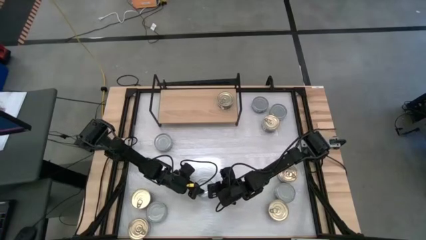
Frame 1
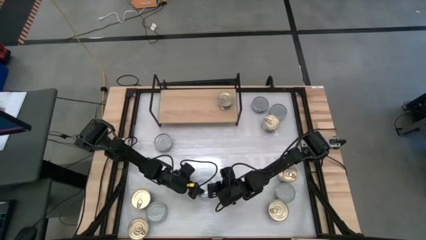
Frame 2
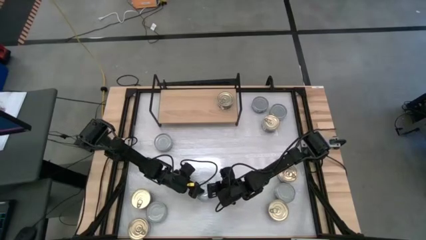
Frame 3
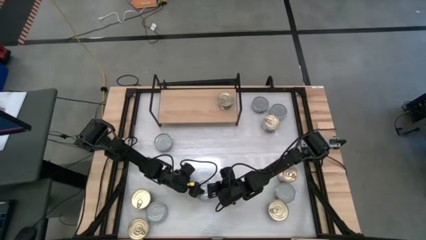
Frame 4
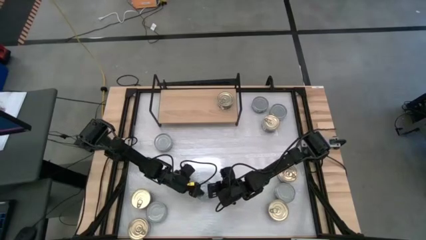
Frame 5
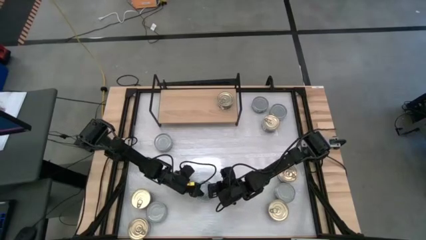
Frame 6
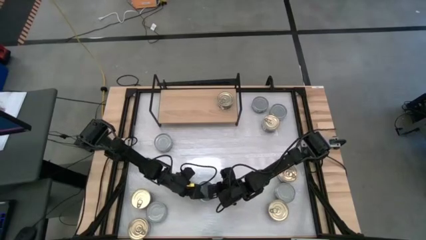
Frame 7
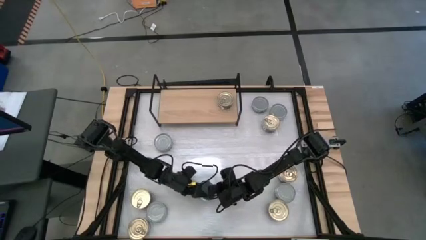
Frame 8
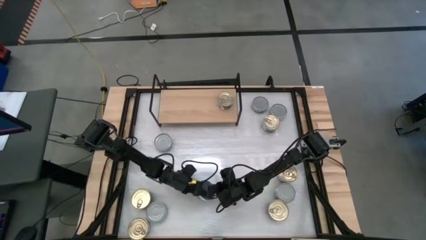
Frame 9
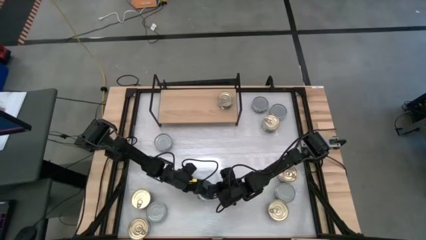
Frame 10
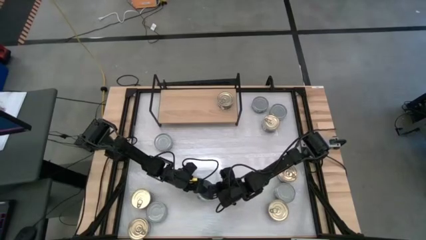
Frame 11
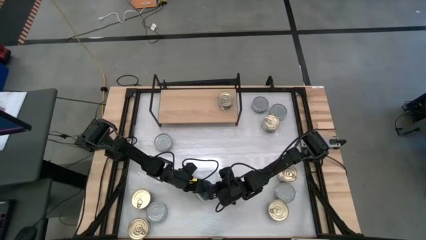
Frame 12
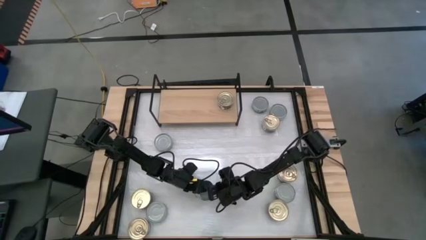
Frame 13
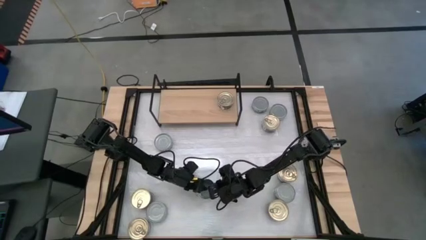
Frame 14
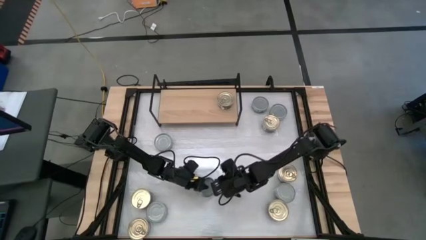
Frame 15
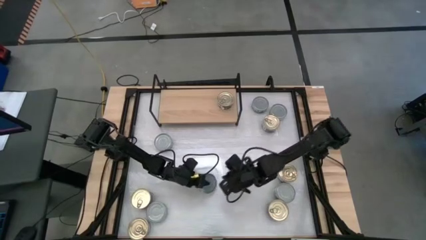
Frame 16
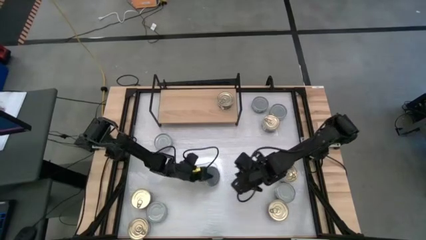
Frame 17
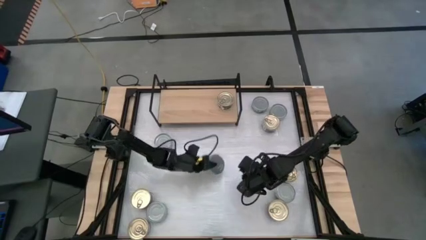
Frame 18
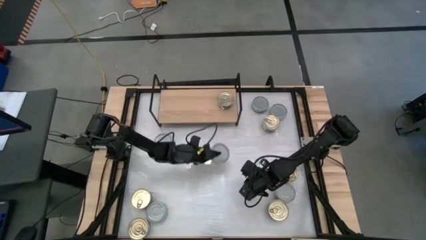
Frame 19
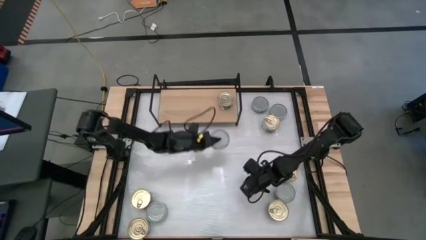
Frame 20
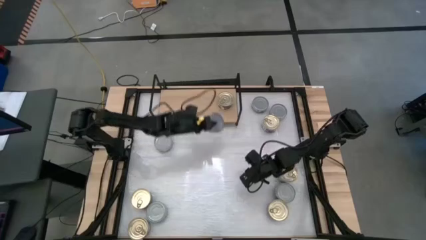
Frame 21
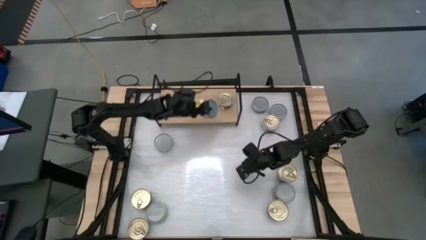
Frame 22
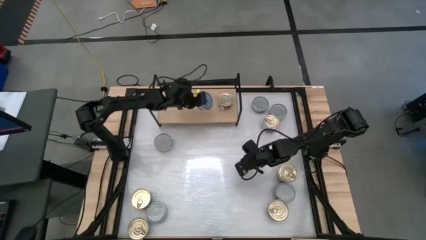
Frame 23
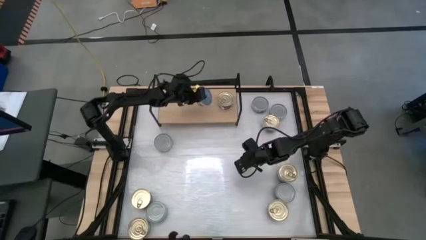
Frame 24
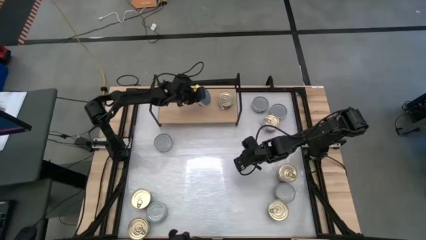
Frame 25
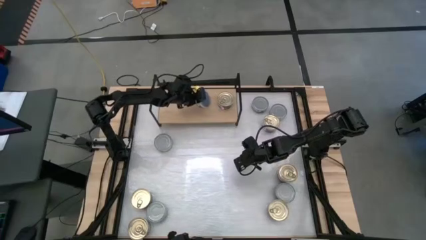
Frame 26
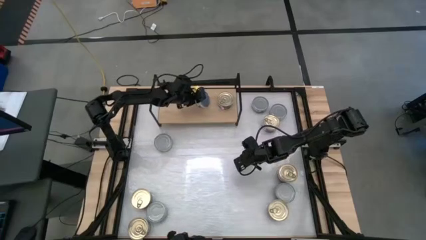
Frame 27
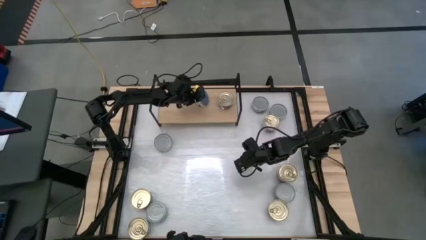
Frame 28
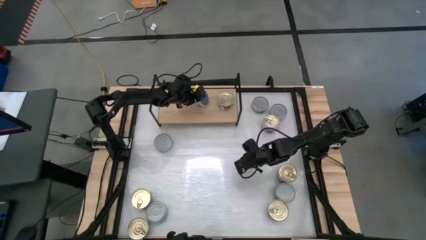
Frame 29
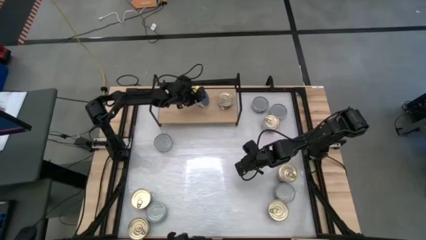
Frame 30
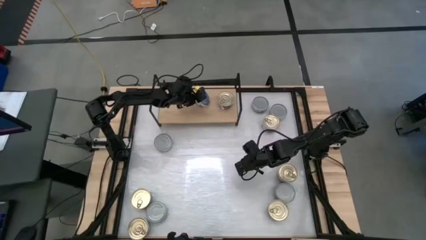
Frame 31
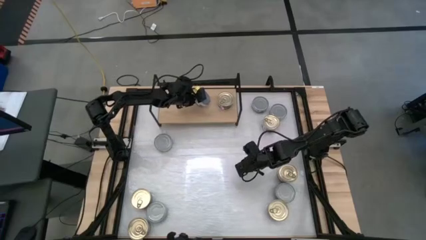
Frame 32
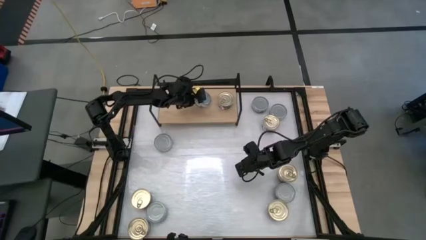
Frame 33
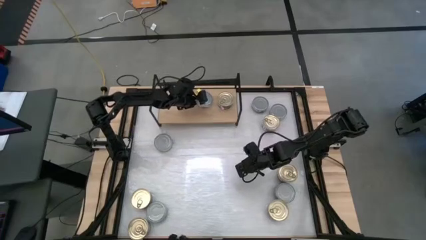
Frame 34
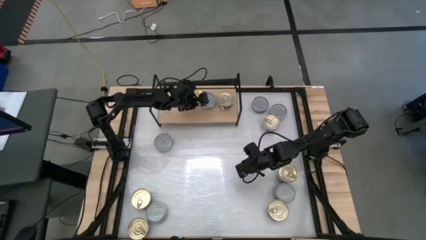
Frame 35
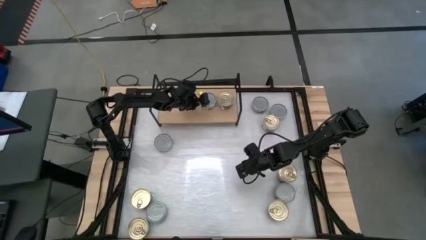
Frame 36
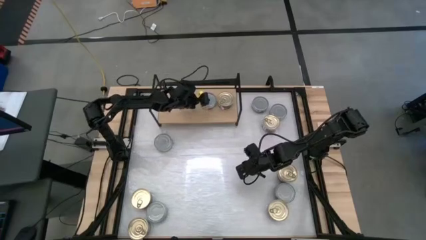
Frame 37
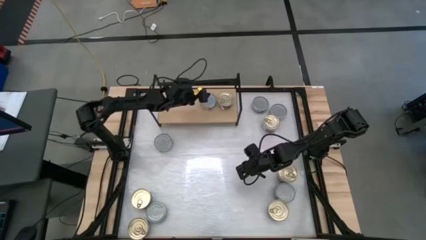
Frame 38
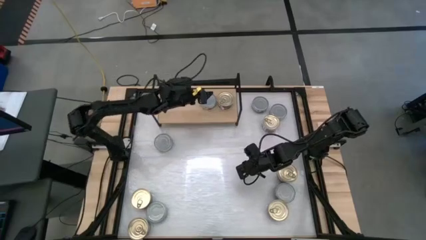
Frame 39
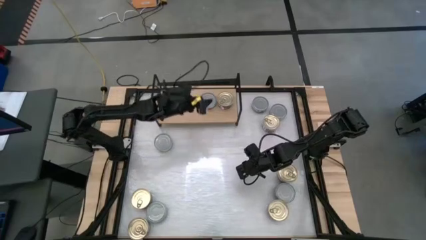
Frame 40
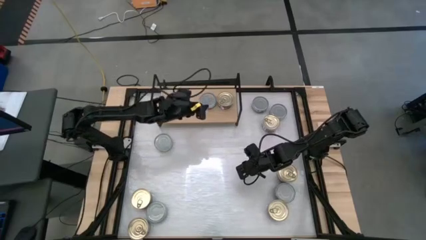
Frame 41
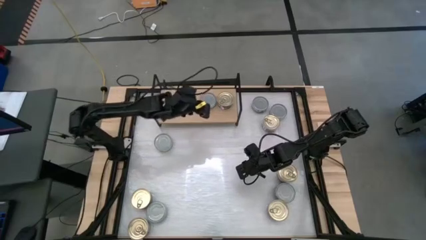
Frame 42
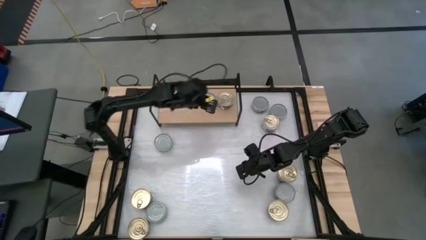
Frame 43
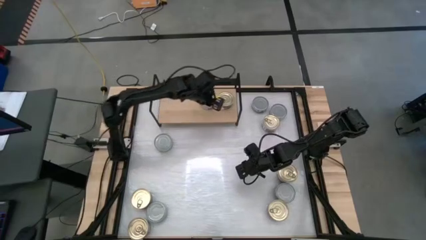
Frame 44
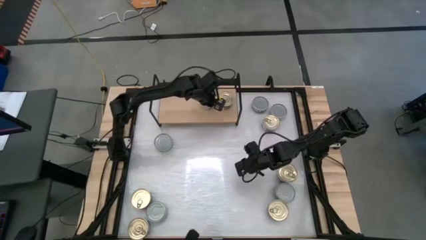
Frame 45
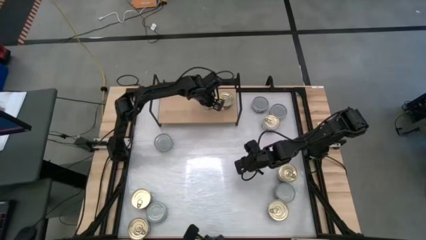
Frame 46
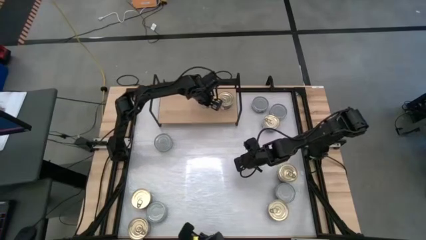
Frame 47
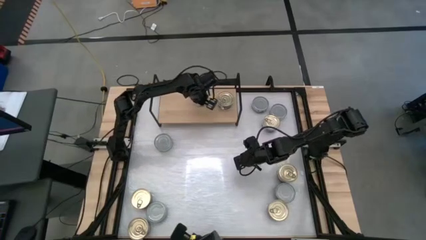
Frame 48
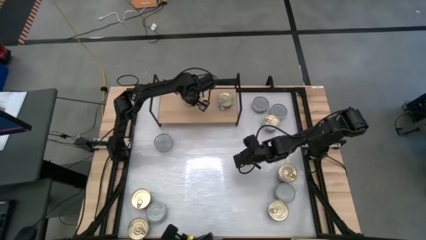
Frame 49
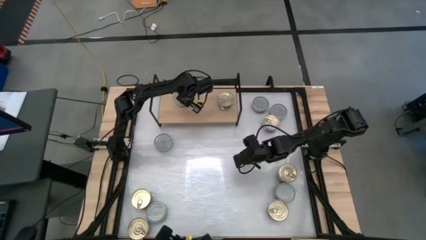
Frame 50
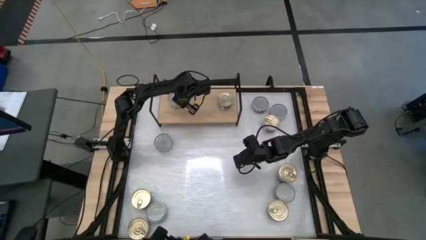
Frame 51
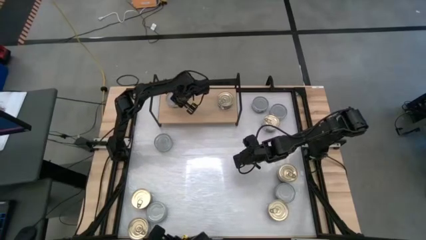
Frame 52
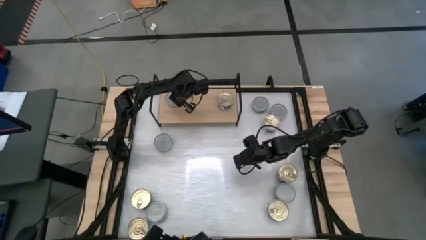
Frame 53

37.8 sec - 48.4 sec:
Task: Stack canned seafood by type on shelf
Put the green tuna can on the shelf

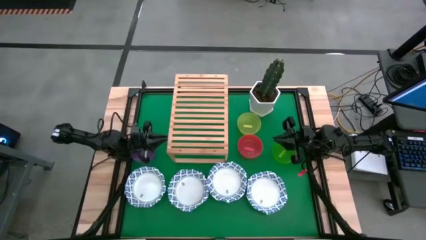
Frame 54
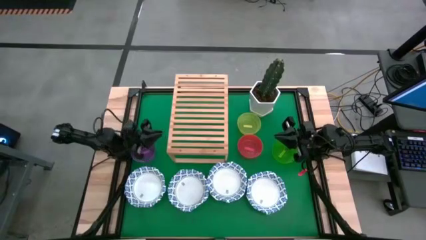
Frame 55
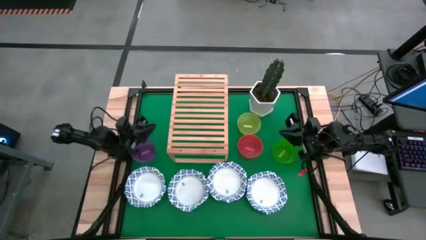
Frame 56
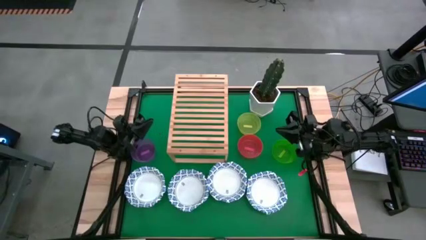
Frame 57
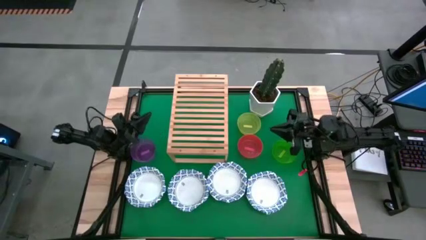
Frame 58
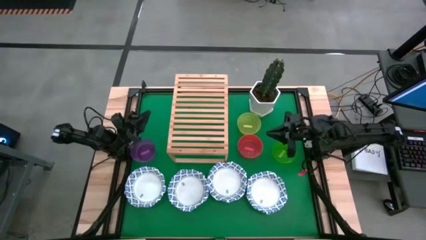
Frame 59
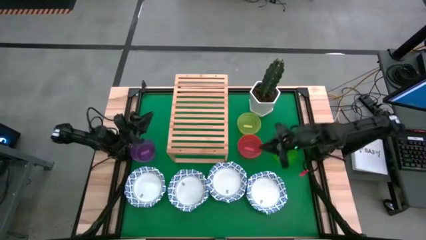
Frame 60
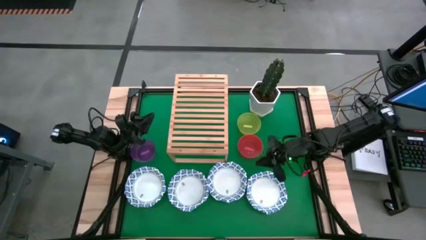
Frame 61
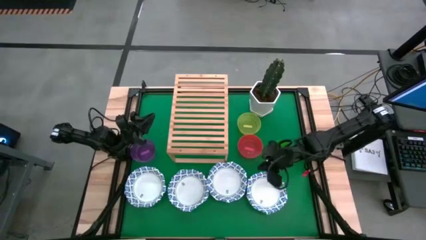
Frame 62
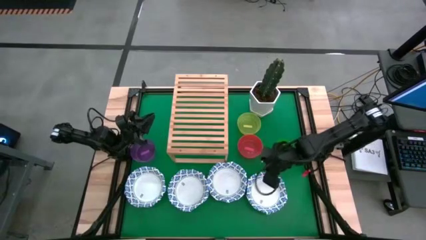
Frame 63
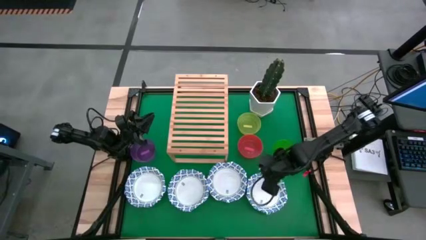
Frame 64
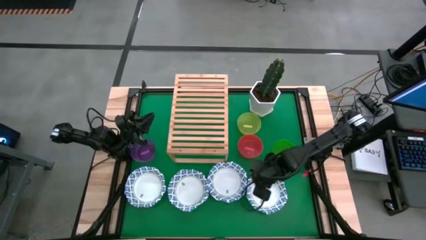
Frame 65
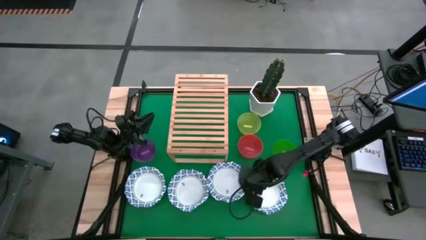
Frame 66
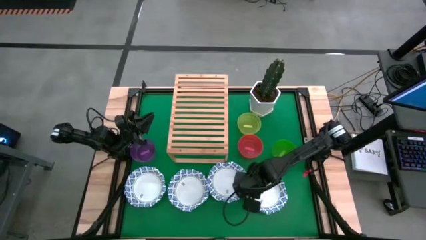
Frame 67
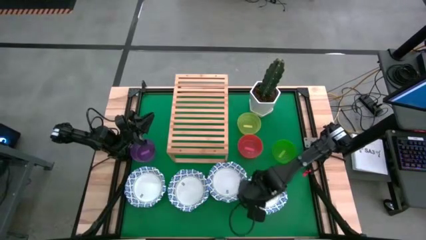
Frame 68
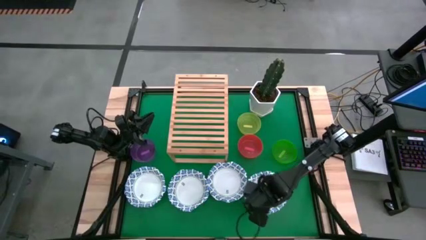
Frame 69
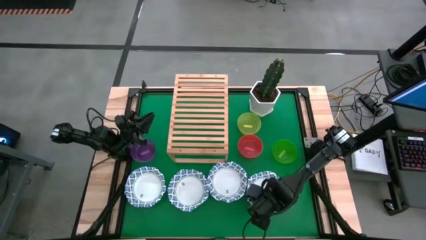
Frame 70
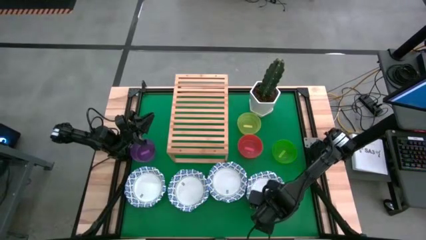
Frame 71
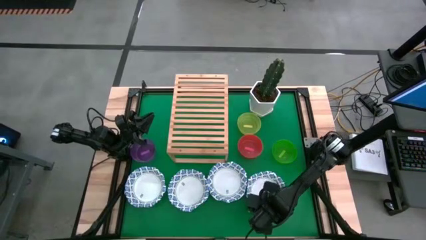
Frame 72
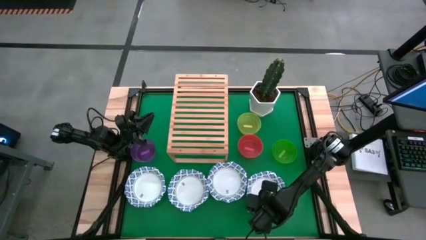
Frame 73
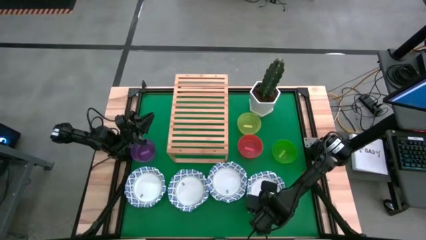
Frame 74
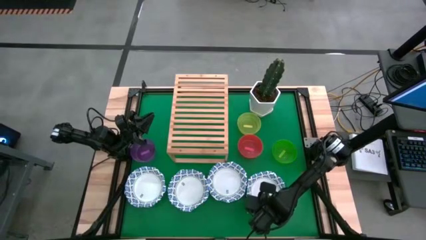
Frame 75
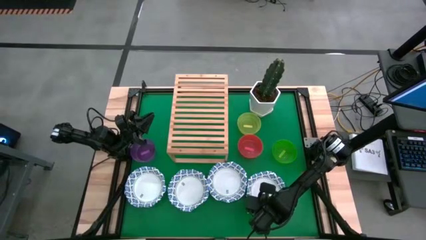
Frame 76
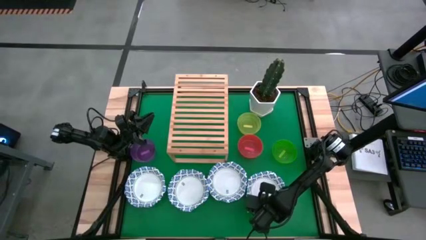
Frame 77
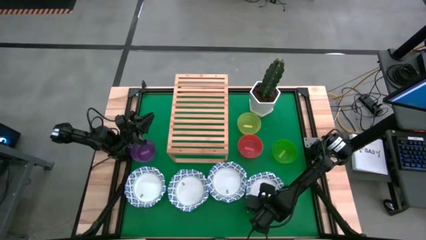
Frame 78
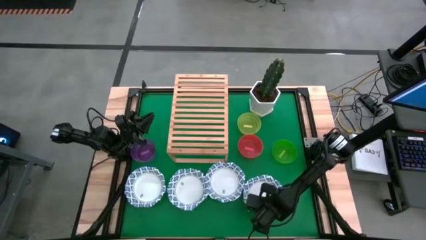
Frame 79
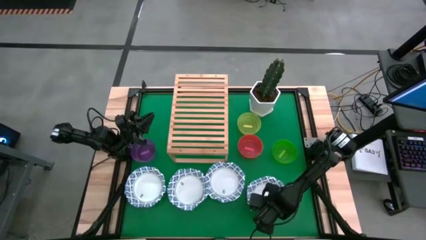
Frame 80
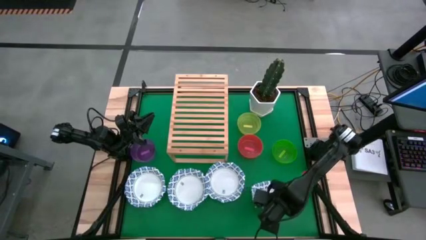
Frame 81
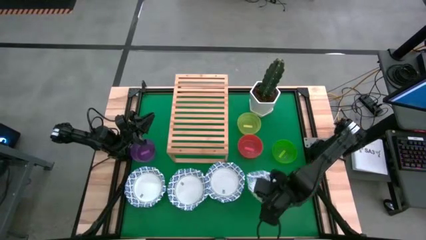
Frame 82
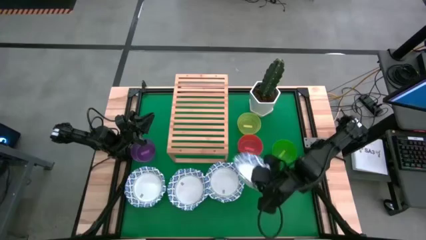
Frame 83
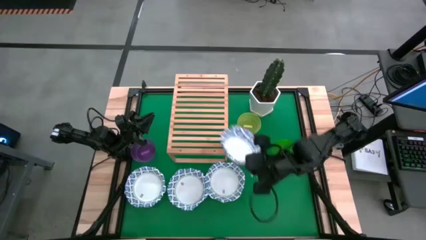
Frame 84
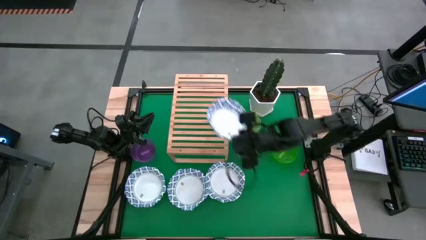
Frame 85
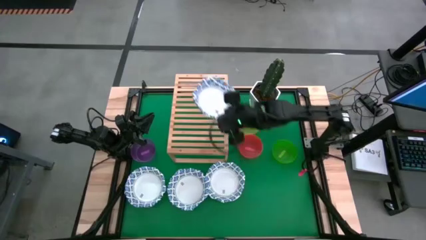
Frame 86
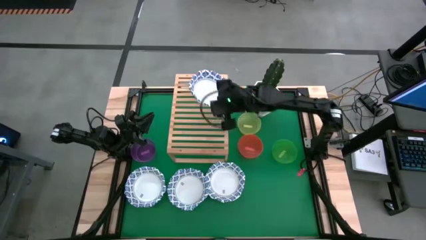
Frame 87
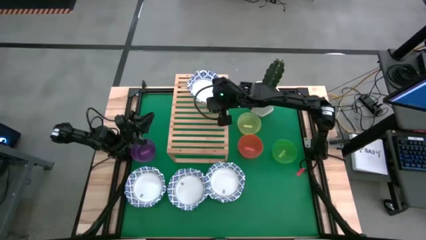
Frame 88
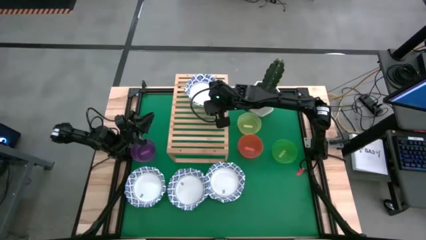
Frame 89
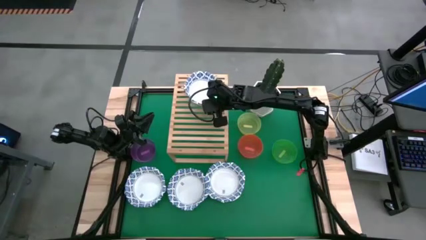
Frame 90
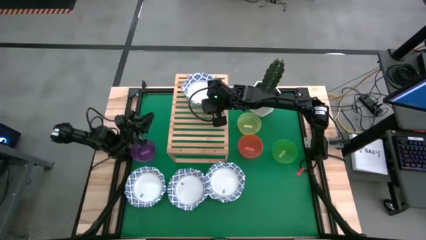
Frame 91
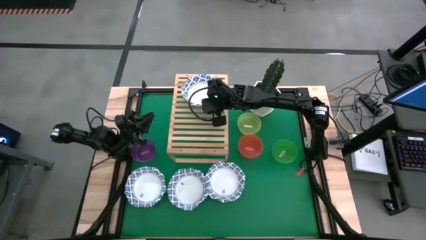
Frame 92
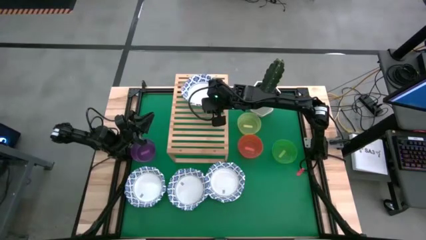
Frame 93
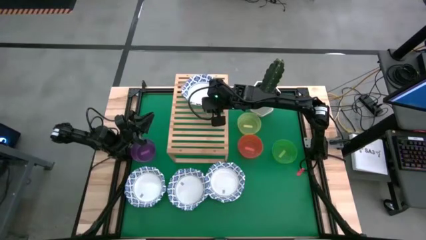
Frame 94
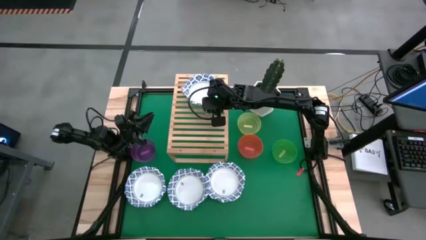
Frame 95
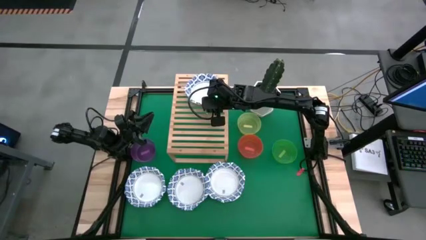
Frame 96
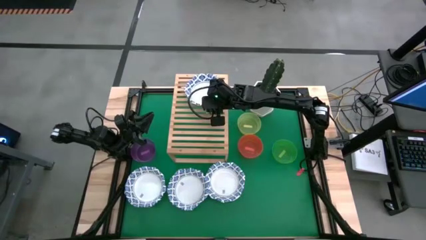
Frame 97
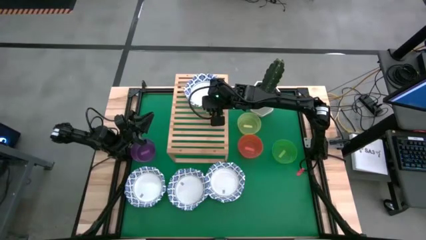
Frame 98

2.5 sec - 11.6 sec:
Task: Place and stack bowls onto a shelf
Put the white and blue bowl on the shelf
